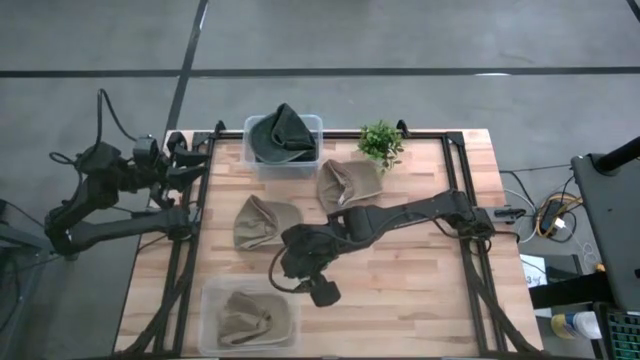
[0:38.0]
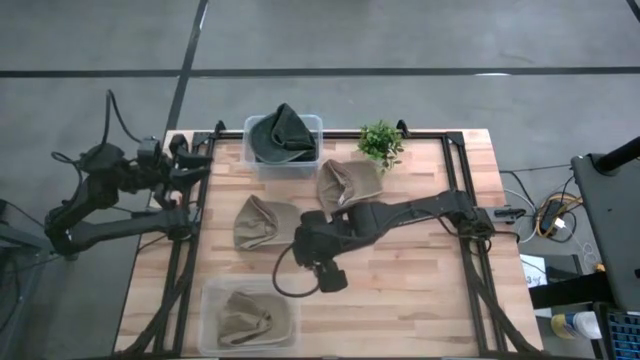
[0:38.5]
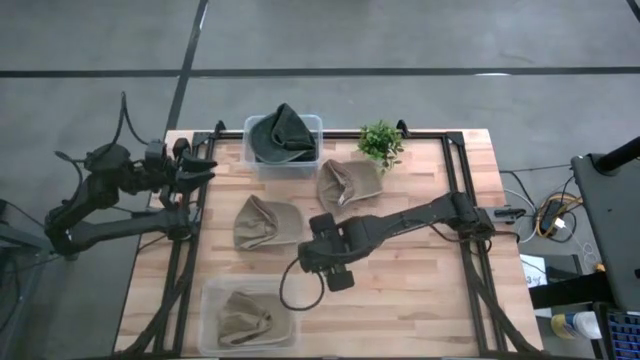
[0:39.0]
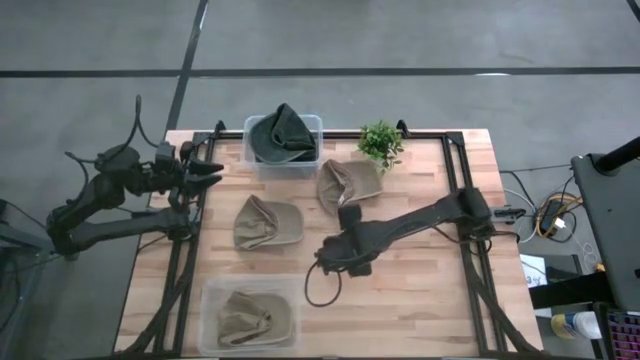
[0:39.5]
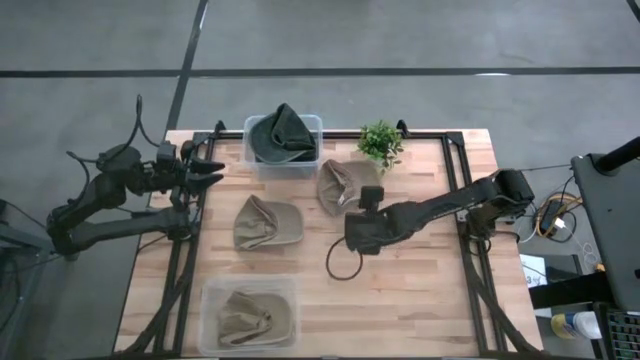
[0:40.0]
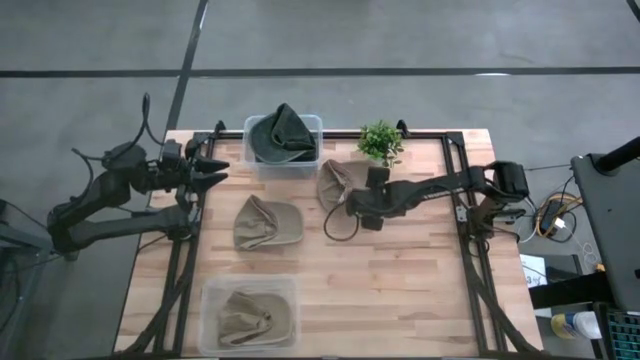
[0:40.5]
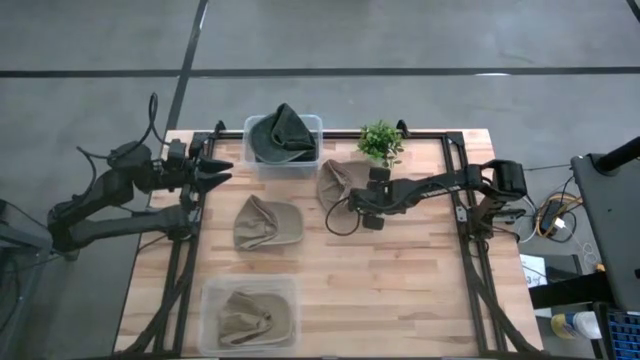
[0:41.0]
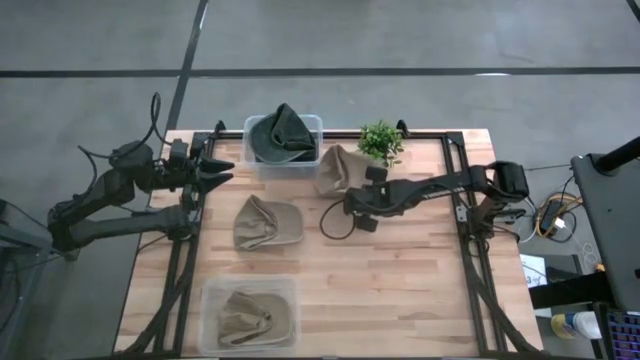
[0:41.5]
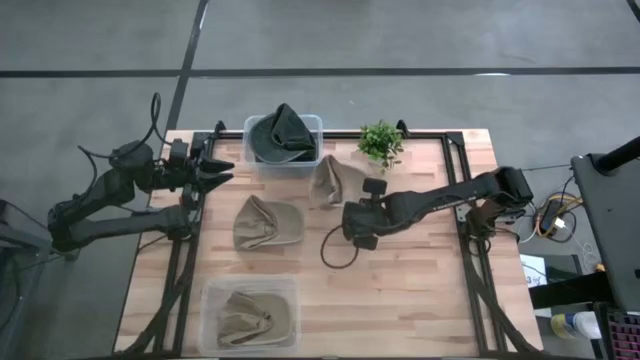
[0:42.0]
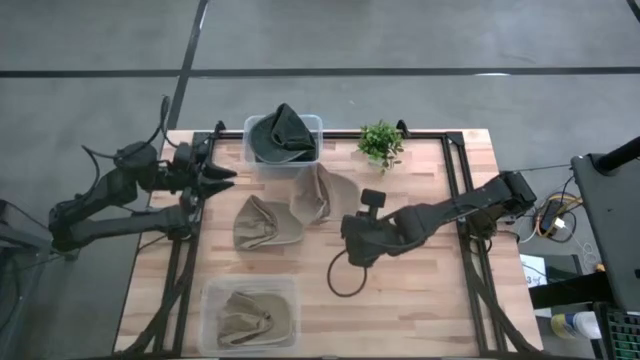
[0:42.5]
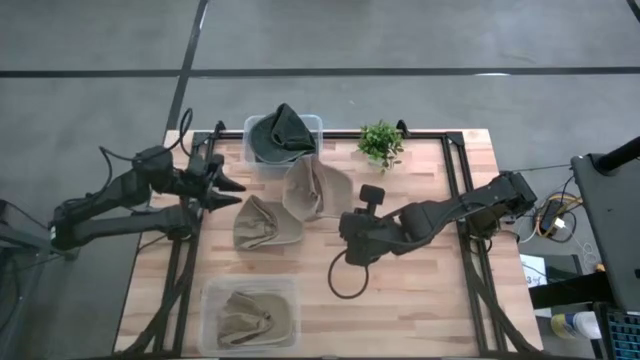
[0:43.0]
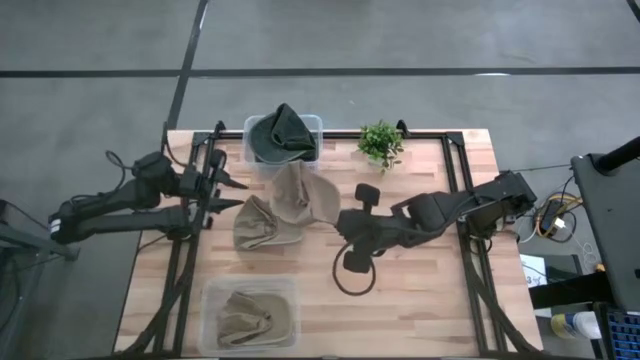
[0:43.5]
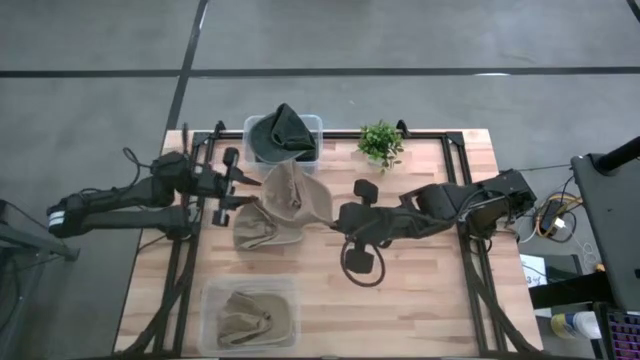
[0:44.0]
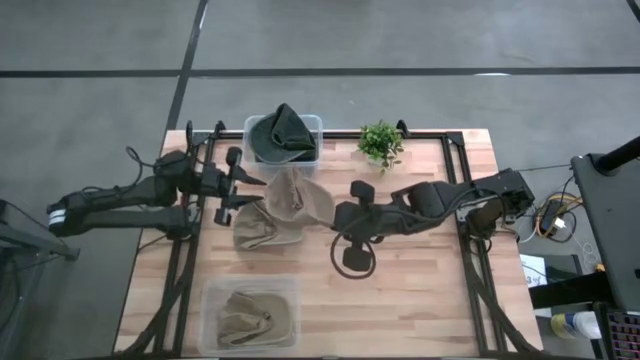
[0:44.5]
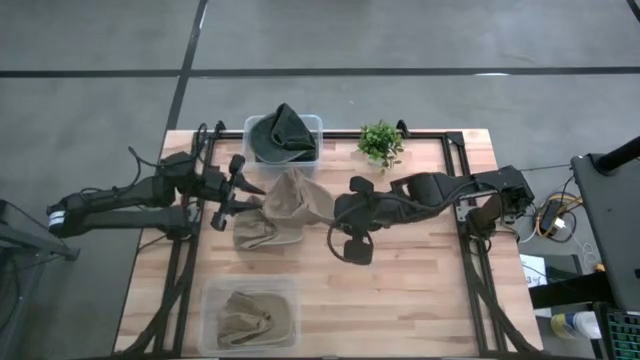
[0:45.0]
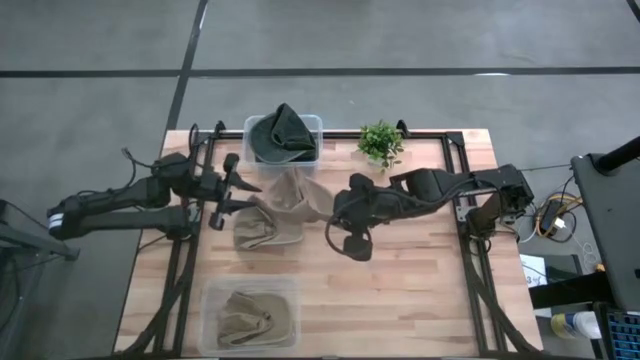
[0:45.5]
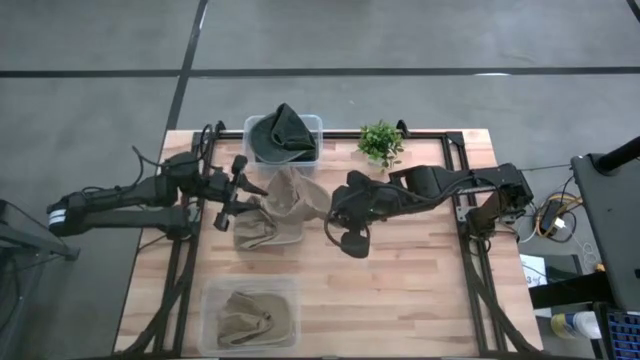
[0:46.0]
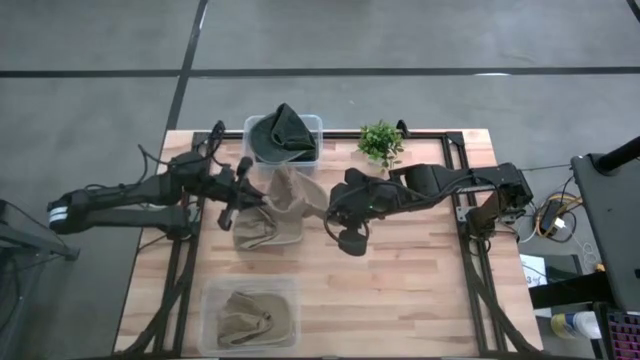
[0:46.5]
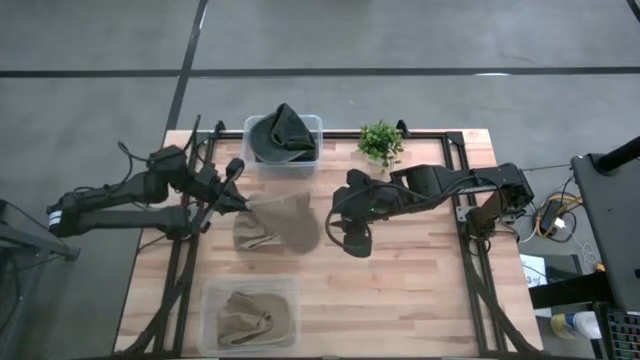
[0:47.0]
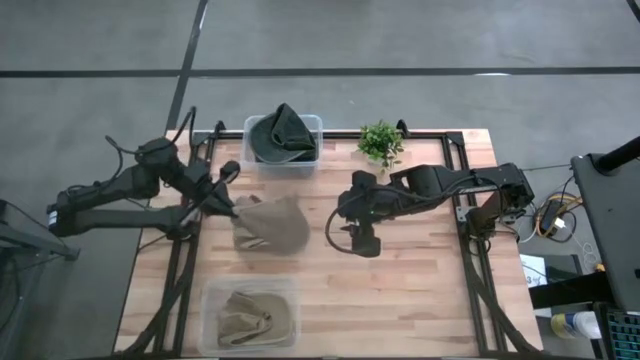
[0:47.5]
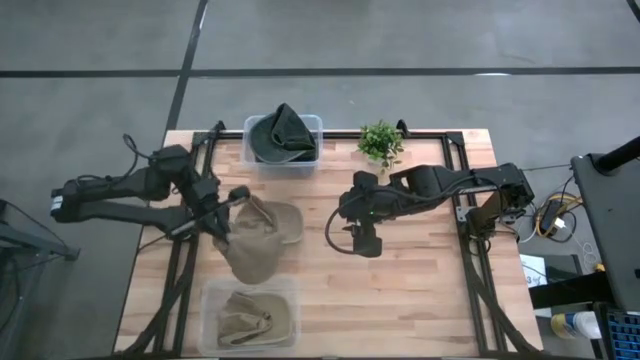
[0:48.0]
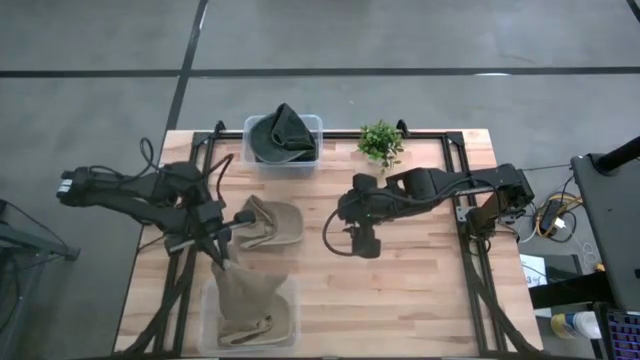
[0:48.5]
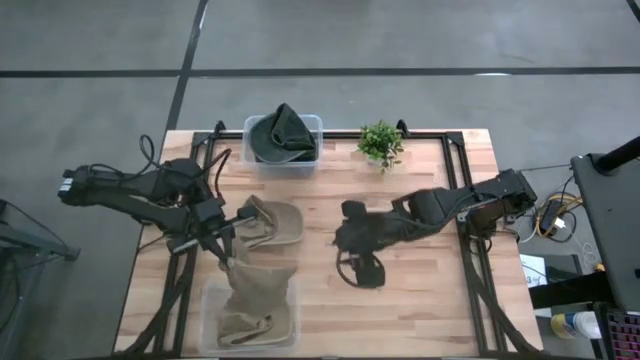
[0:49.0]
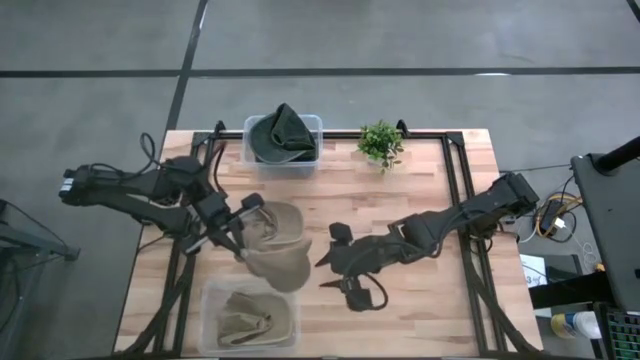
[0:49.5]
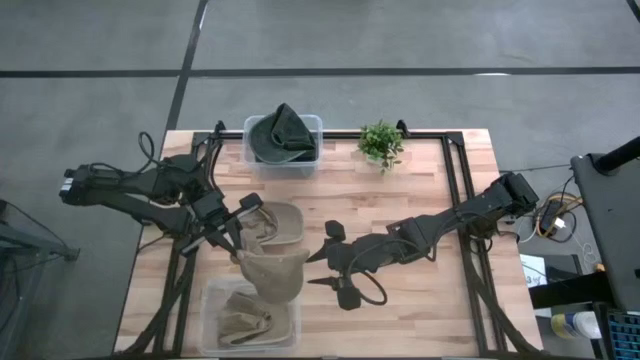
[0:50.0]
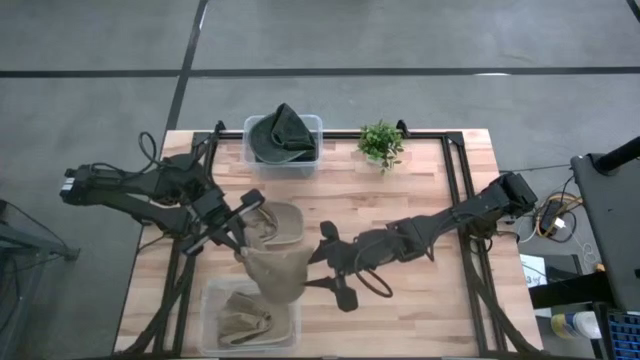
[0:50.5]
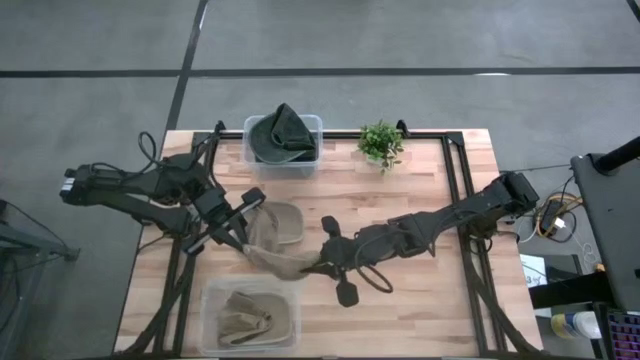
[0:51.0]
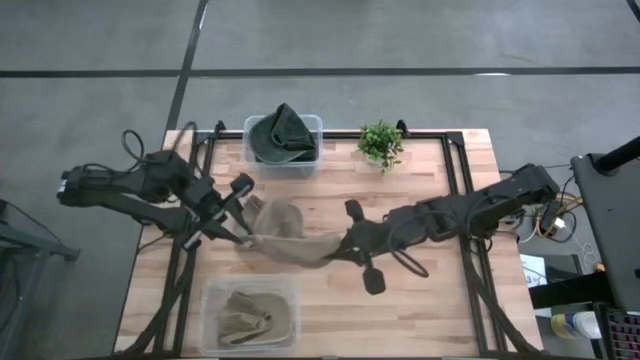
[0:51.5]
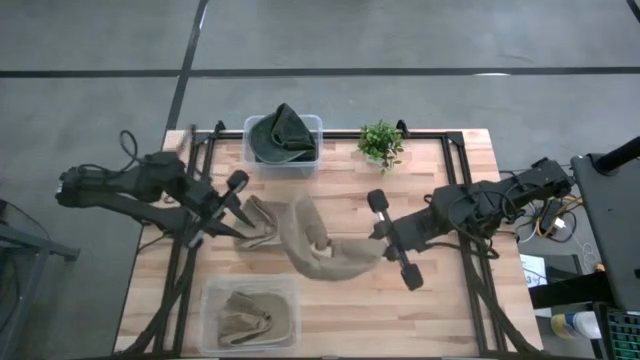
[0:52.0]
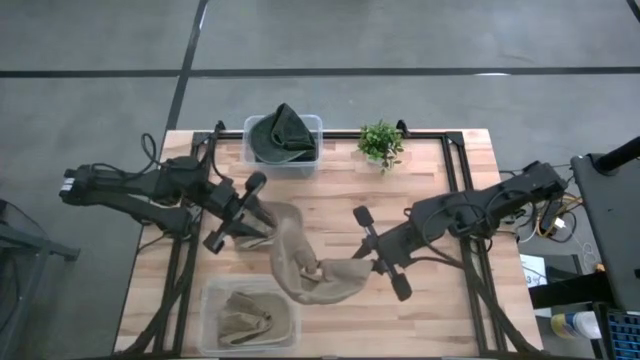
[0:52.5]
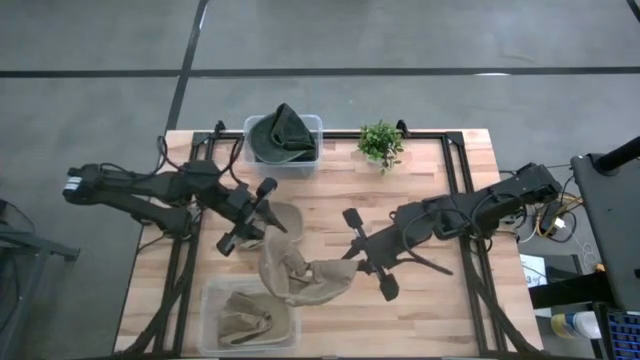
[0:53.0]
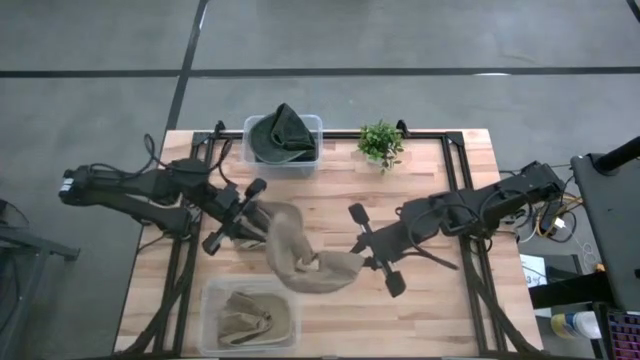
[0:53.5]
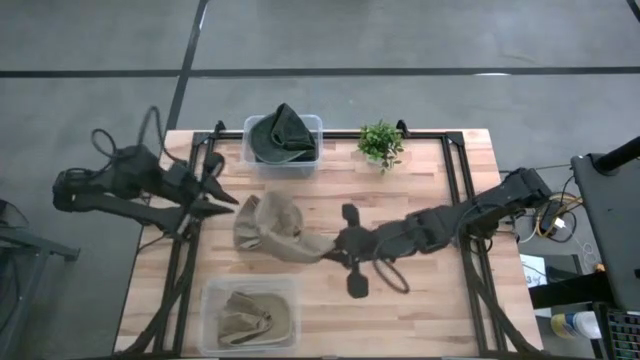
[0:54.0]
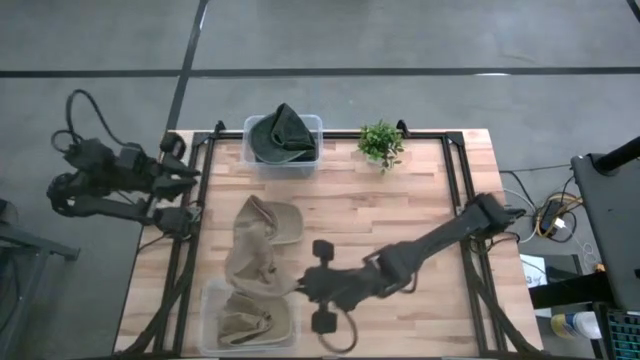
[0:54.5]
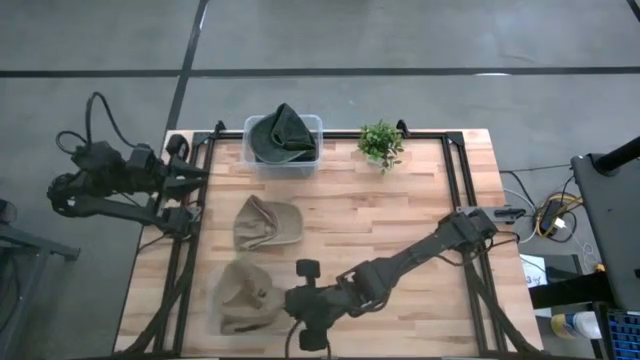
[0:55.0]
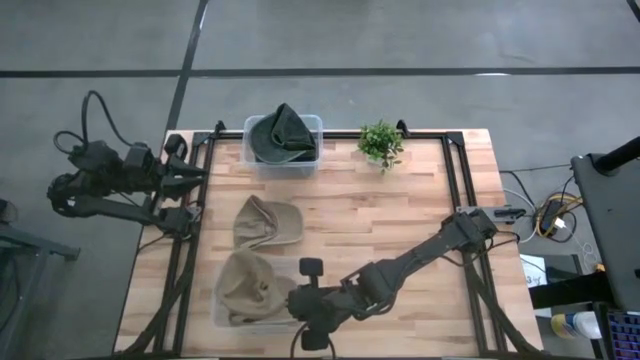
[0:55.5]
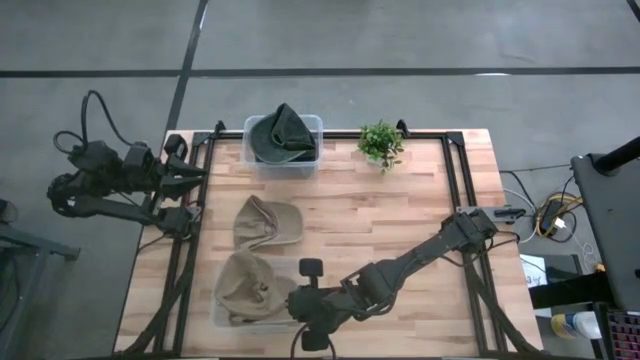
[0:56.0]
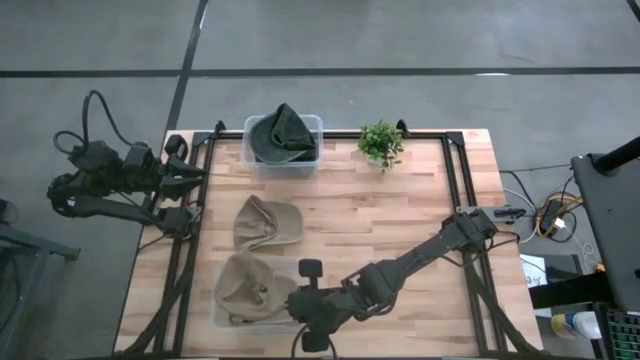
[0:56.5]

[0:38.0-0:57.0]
Task: Pick & Place hat
Put the top brown cap in the bottom transparent bin

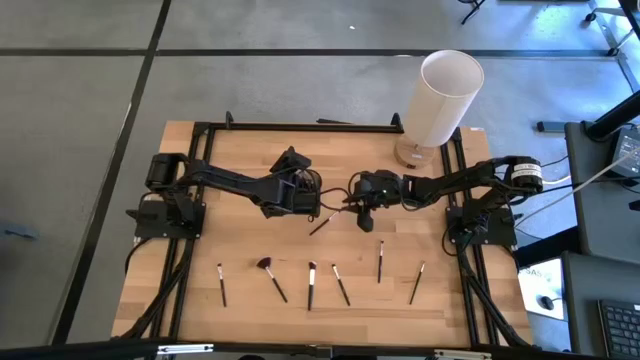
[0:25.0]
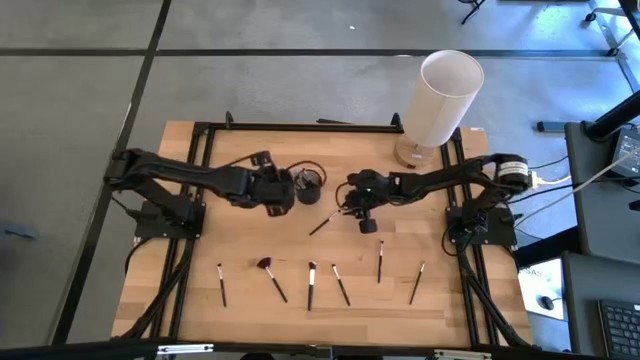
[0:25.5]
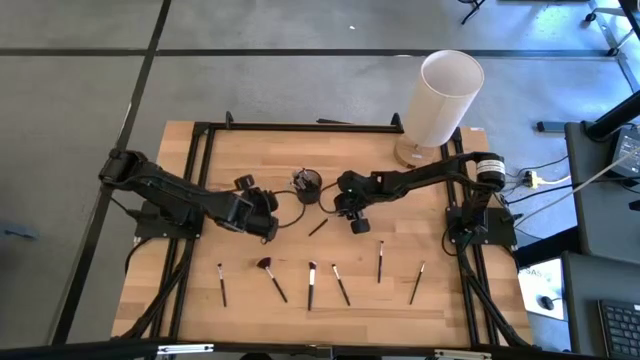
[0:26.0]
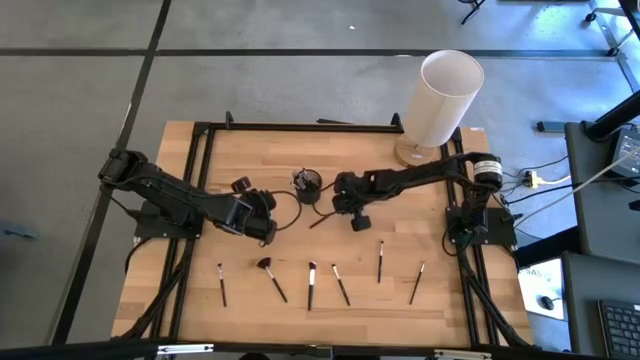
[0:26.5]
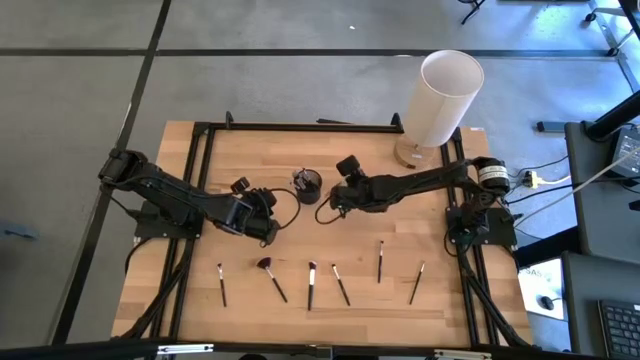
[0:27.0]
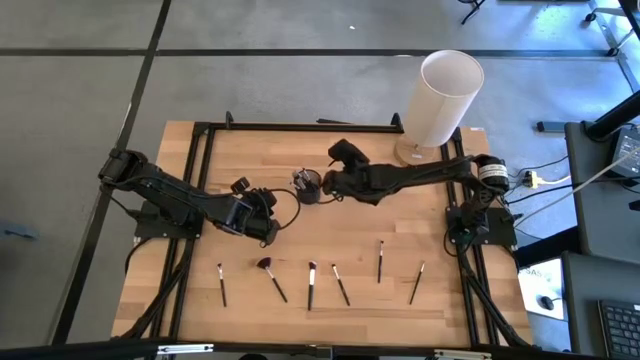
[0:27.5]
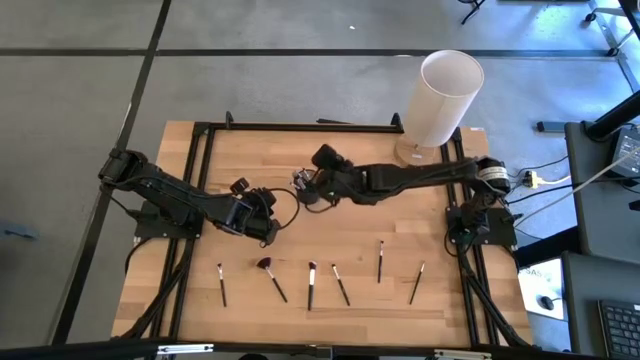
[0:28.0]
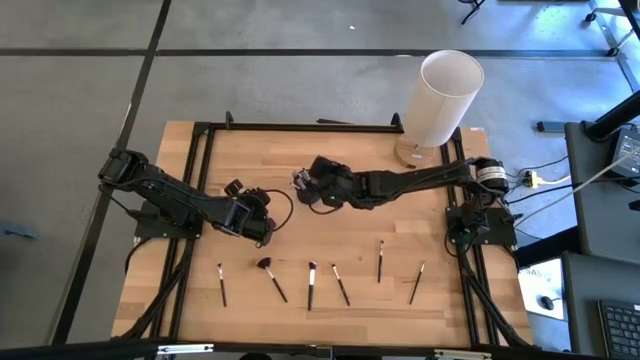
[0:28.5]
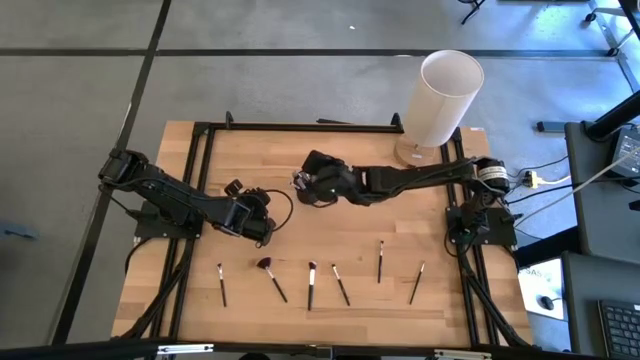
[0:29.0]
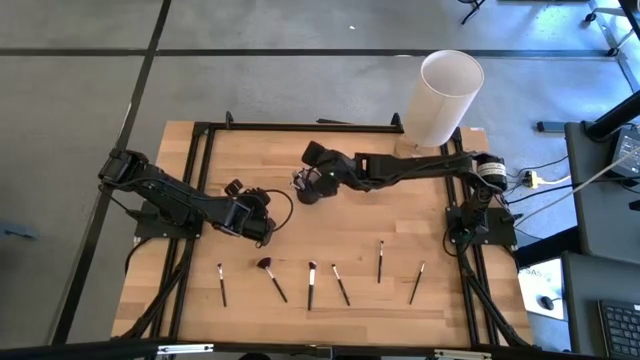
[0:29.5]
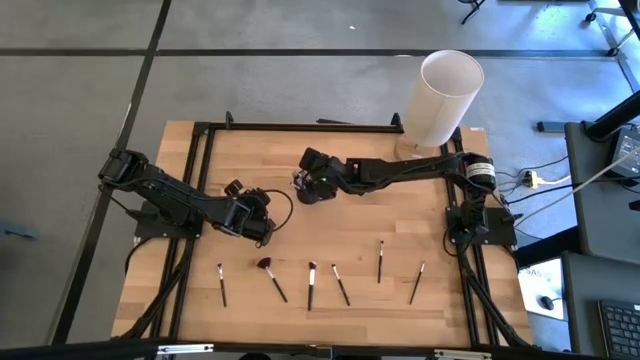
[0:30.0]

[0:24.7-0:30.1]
Task: Put items in baskets/containers
Put the black eyeshadow brush into the black pen holder
